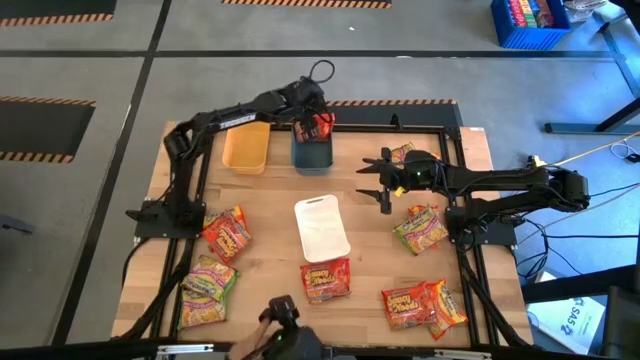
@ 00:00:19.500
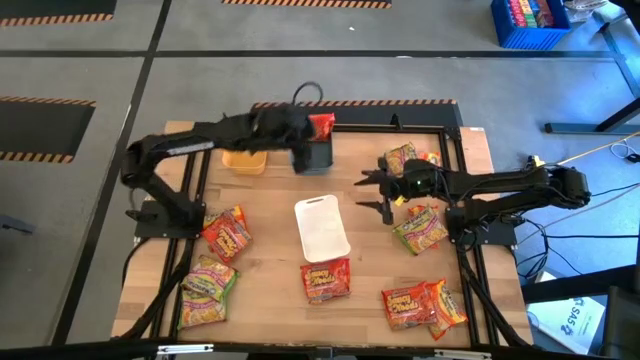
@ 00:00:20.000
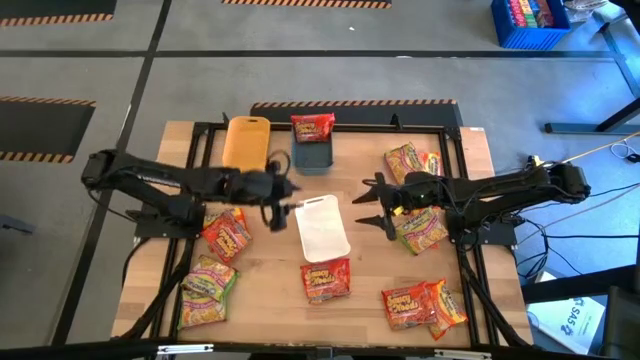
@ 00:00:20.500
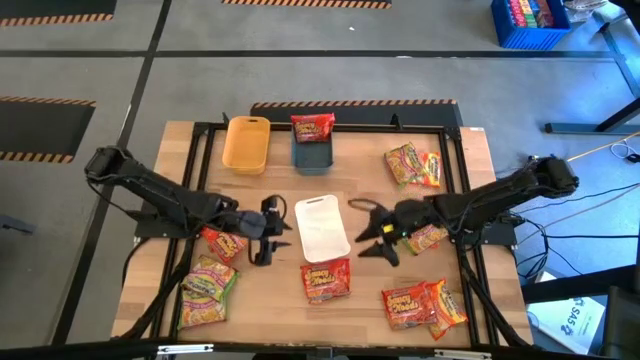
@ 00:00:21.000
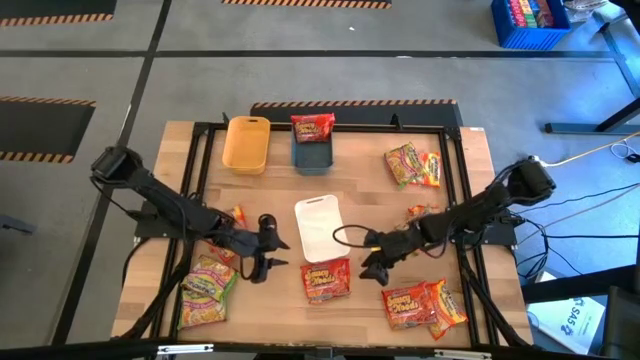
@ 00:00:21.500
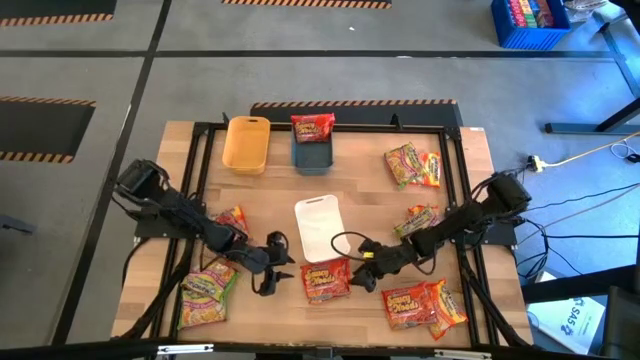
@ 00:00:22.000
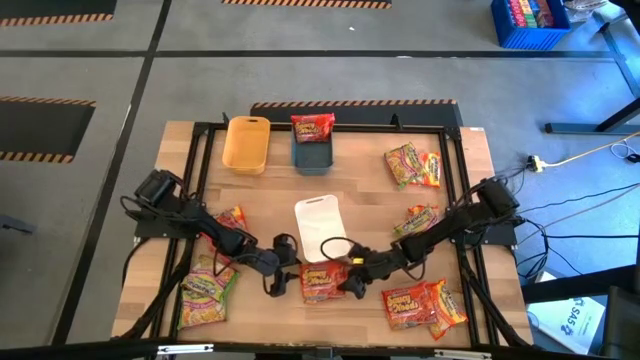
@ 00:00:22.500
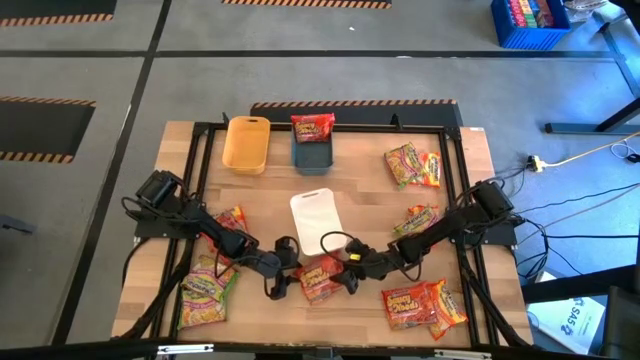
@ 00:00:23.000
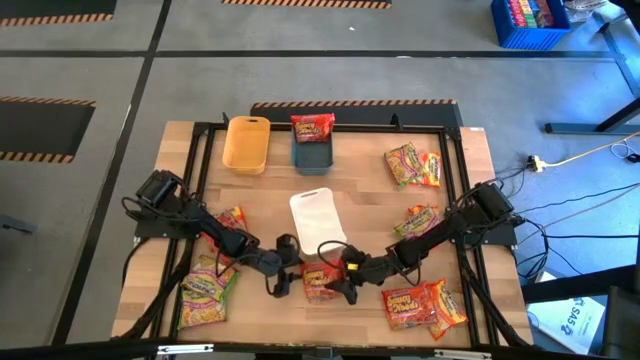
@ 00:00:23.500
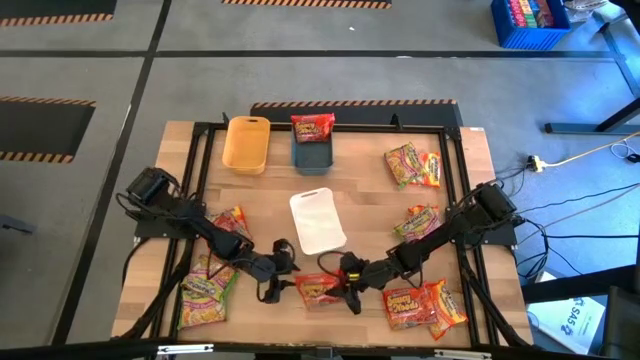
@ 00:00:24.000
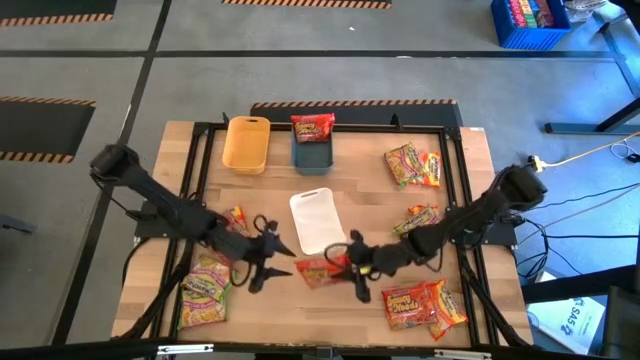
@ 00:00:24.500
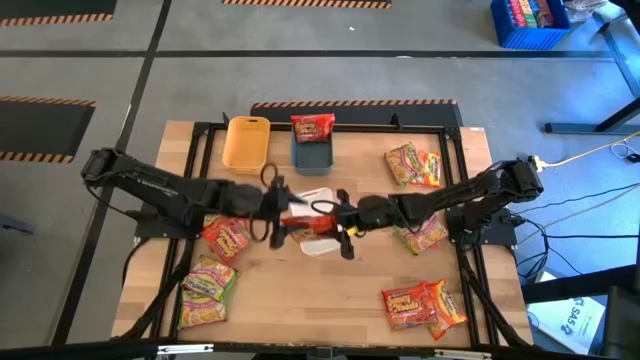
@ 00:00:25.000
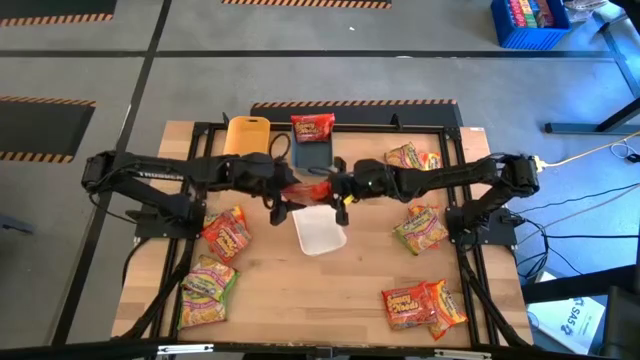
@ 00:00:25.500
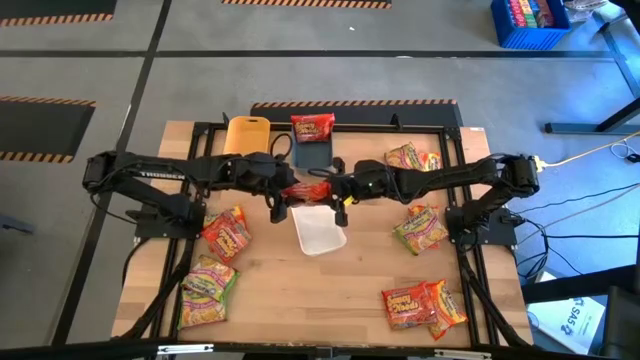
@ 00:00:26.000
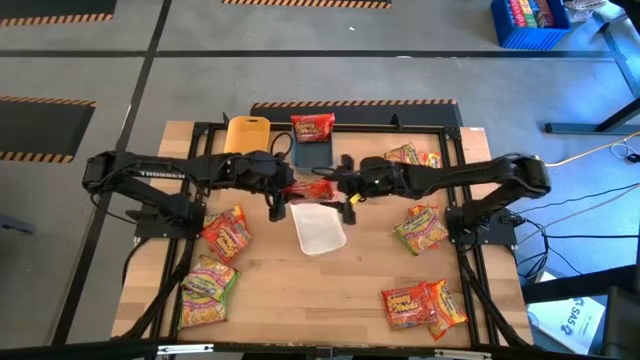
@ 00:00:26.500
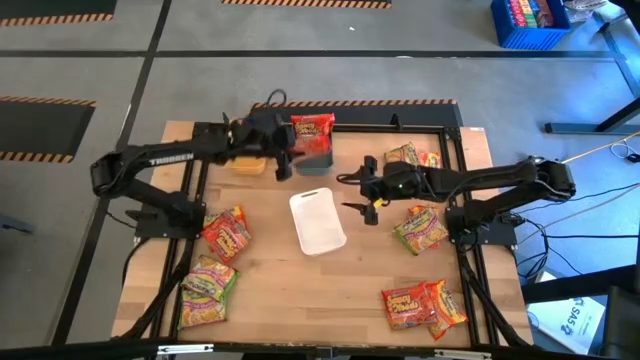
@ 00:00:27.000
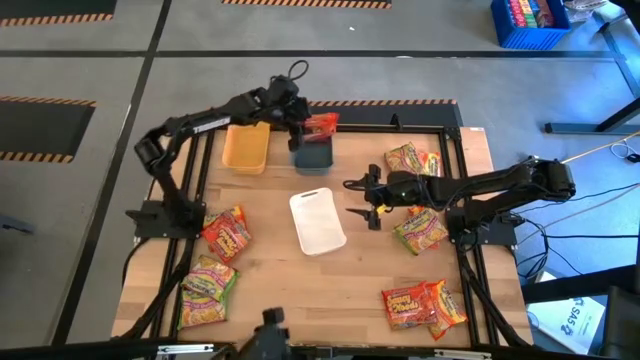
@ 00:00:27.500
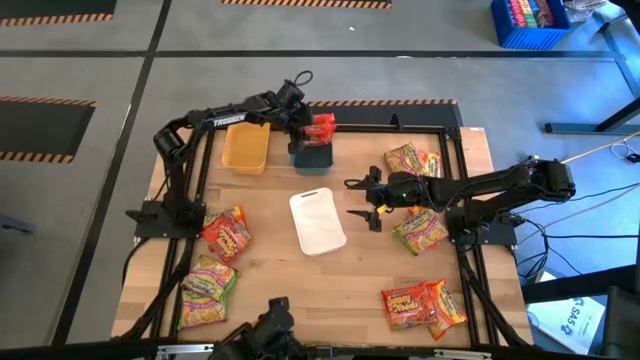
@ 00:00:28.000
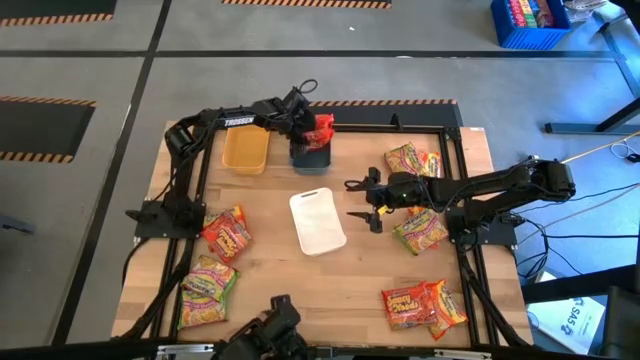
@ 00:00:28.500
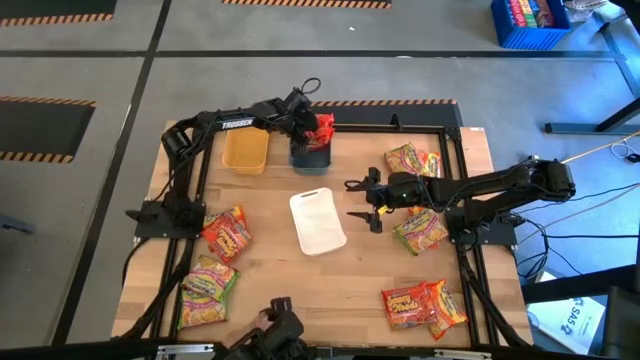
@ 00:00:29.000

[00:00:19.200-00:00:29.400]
Task: Sort Maruchan noodles
Put the middle red noodle pack into the blue bin

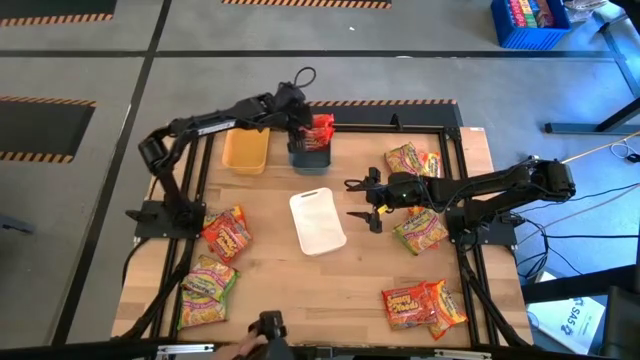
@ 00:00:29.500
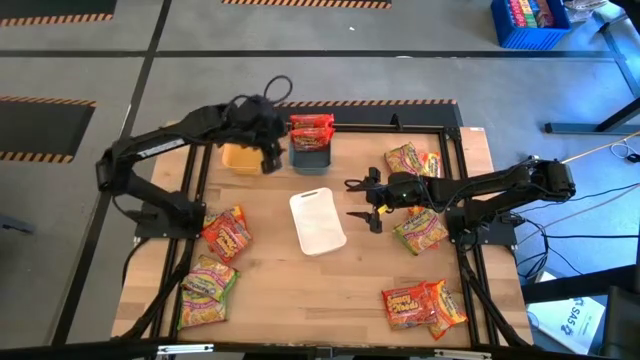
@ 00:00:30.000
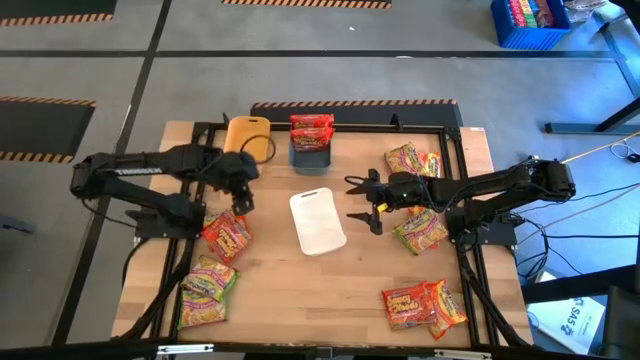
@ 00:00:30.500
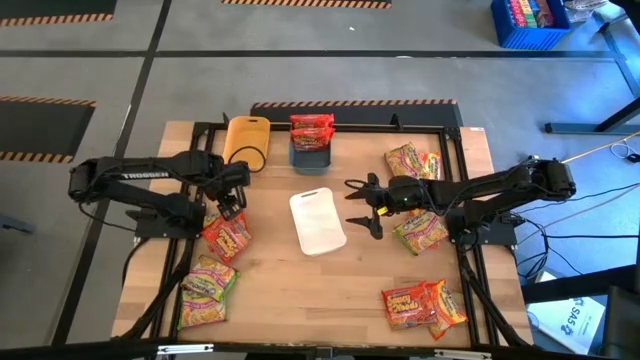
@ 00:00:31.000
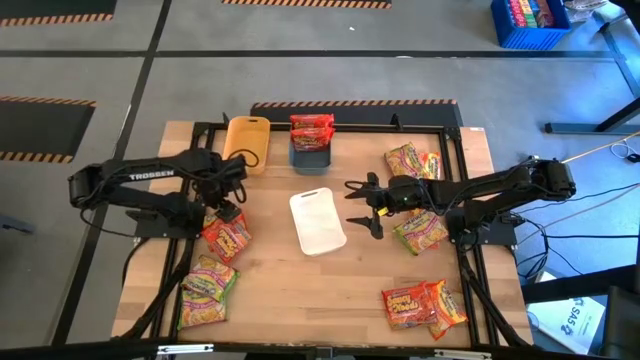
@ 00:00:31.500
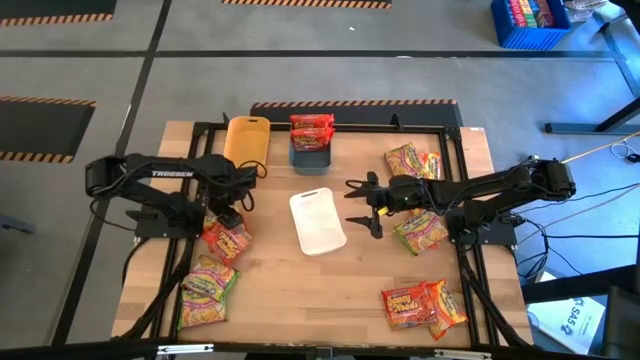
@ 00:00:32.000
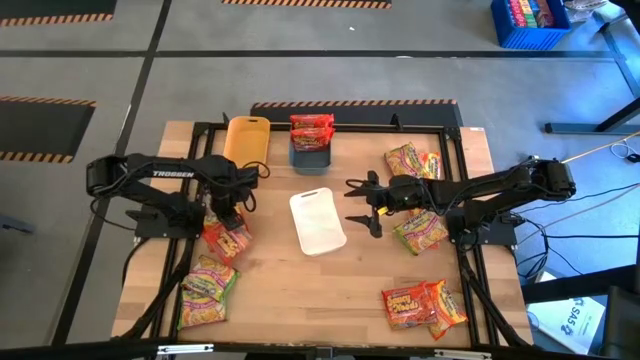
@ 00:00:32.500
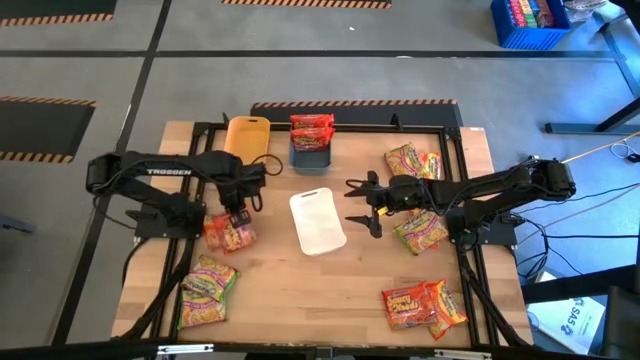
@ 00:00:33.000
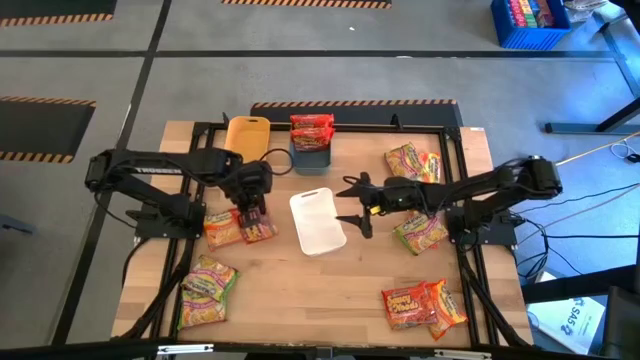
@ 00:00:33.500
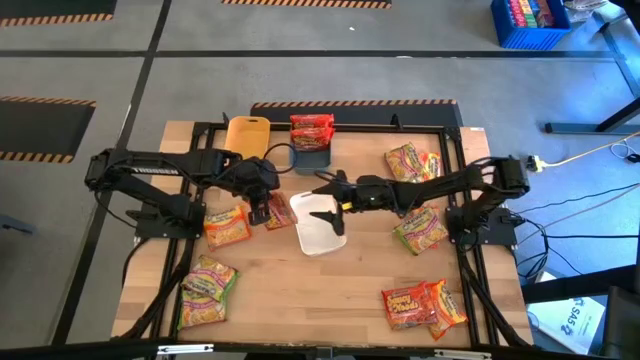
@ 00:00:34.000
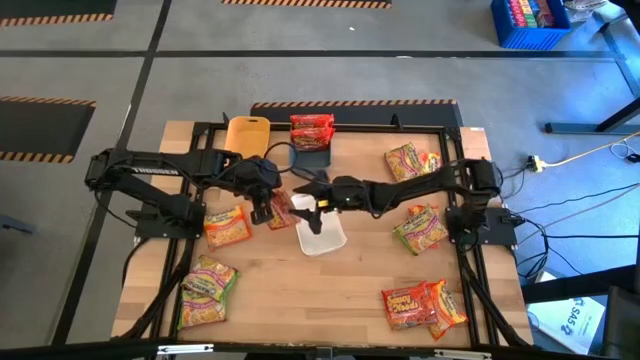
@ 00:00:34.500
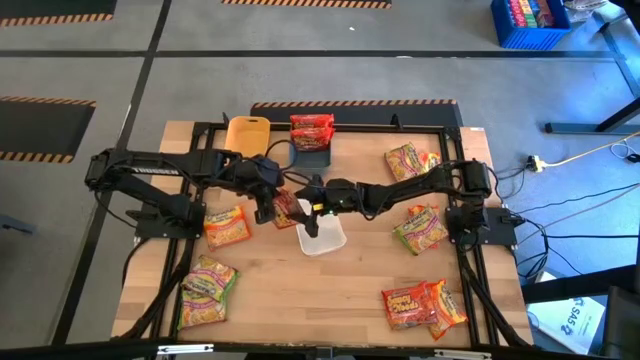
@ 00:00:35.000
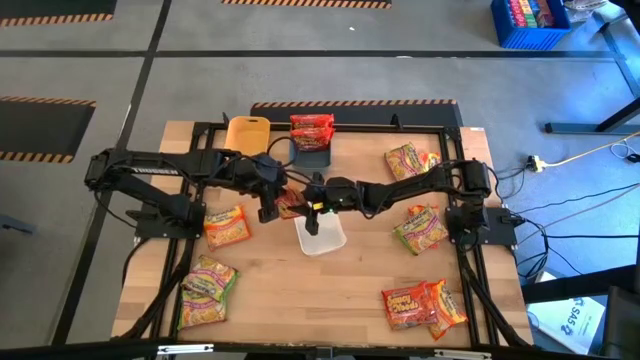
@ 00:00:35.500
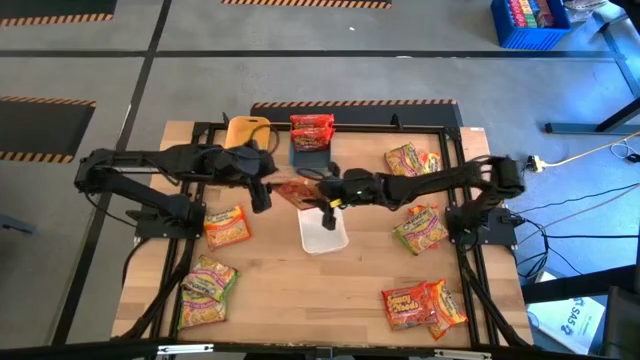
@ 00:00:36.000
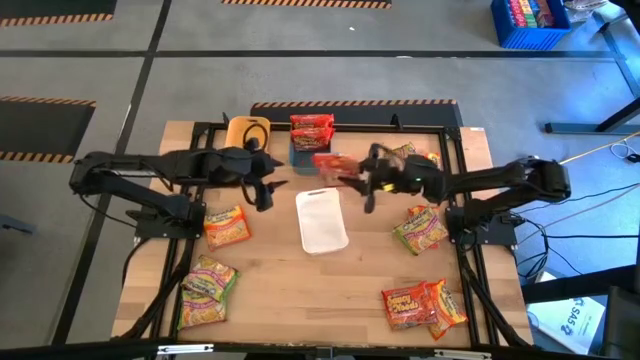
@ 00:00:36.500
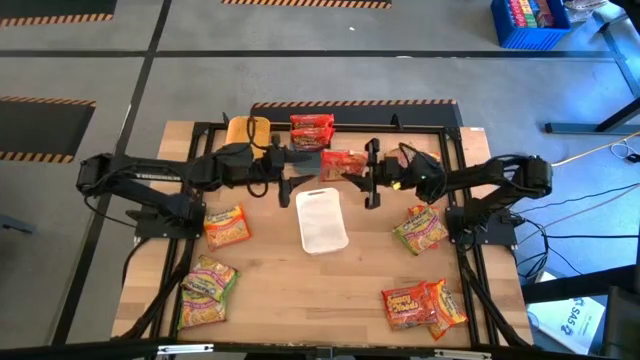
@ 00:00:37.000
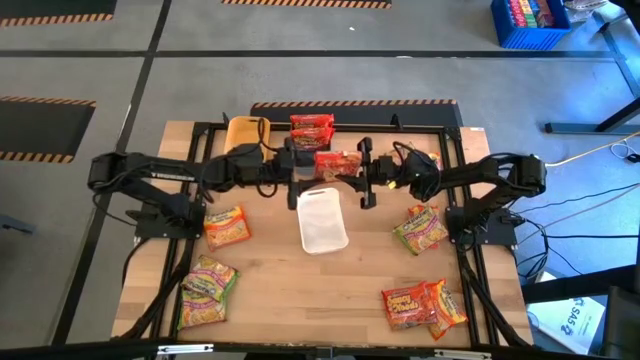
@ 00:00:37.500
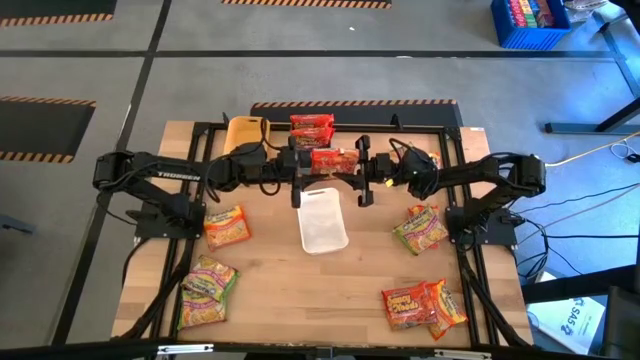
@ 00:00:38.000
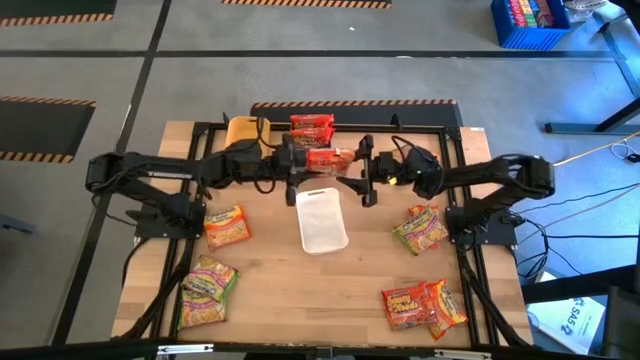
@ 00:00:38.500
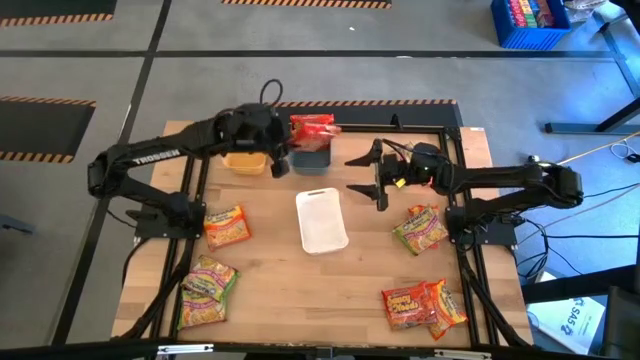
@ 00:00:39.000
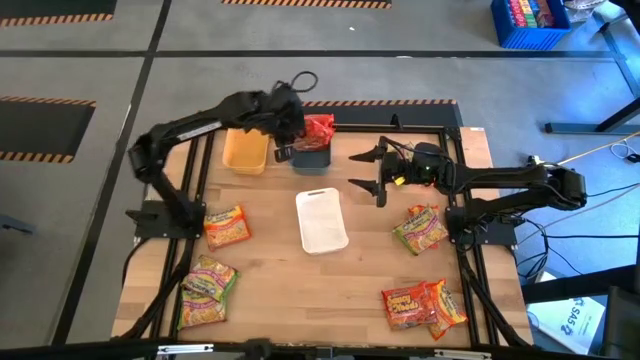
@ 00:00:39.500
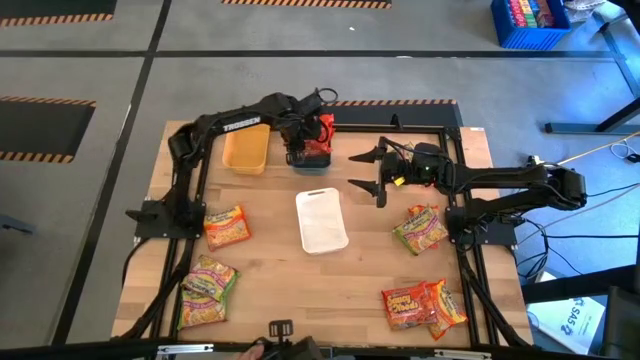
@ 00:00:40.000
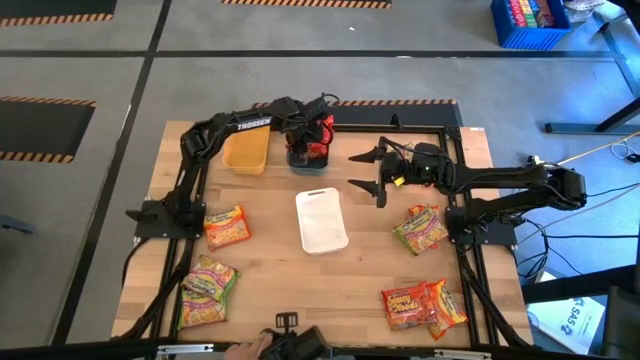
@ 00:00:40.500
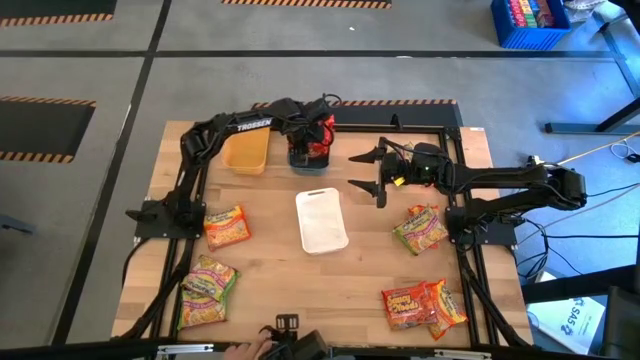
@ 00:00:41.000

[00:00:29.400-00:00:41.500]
Put the left red noodle pack into the blue bin
